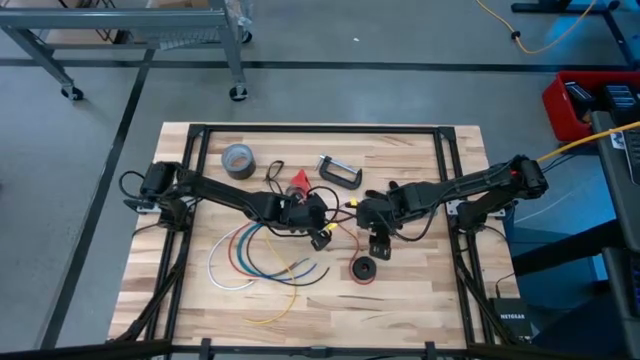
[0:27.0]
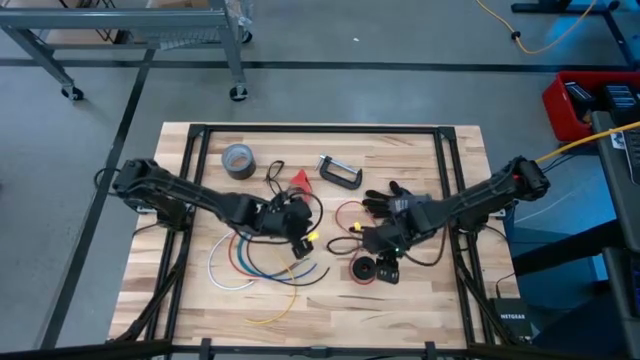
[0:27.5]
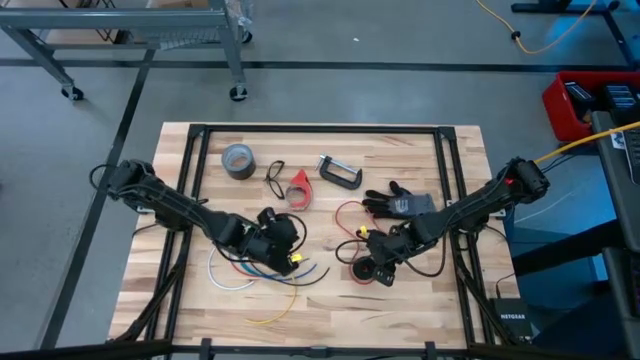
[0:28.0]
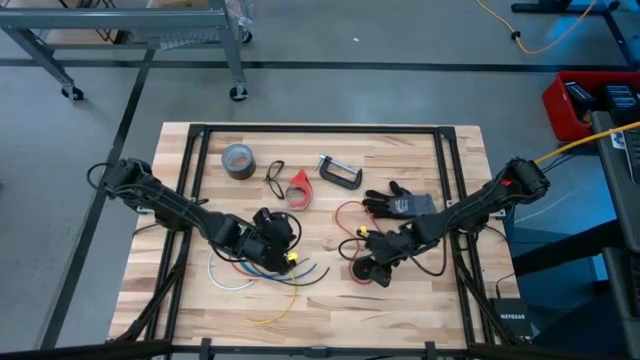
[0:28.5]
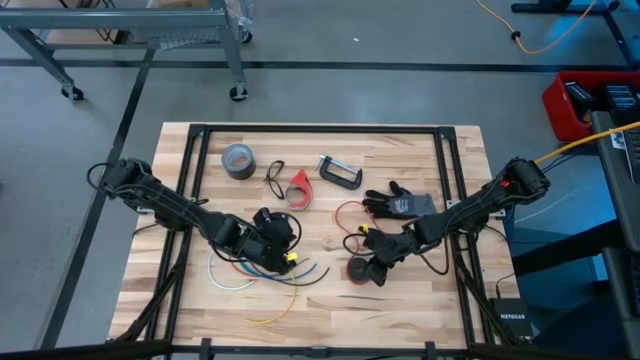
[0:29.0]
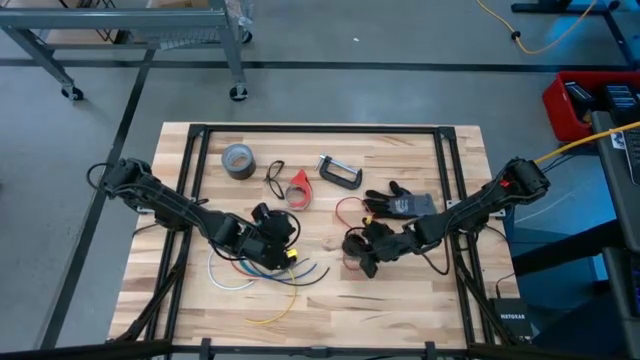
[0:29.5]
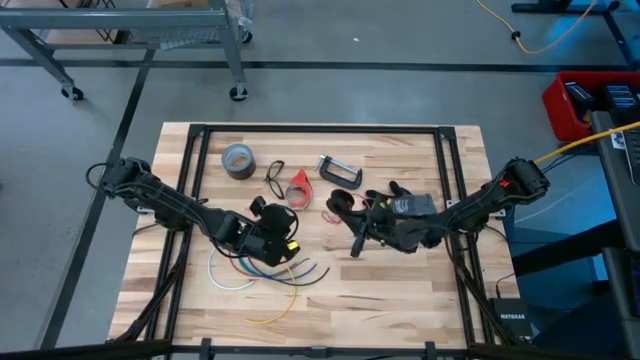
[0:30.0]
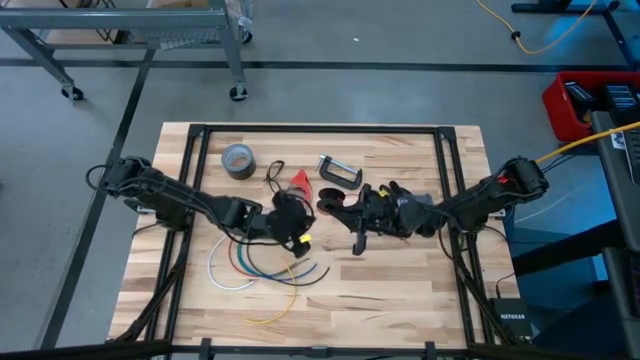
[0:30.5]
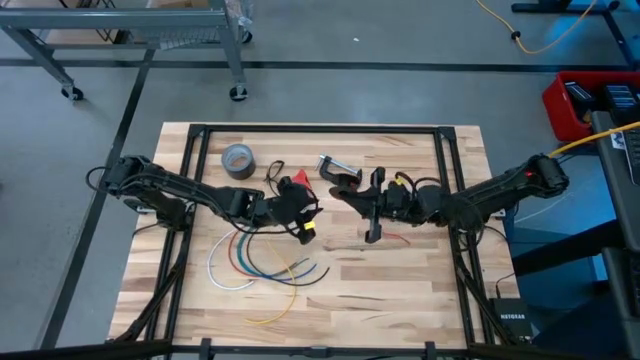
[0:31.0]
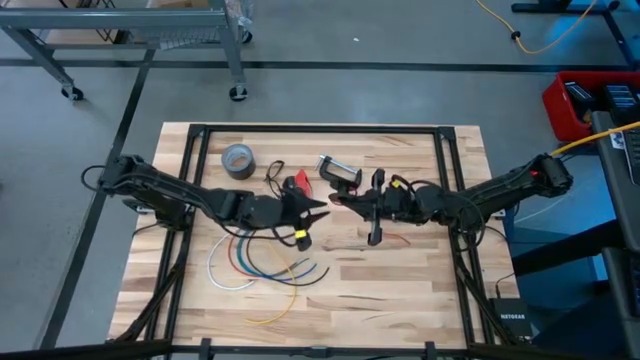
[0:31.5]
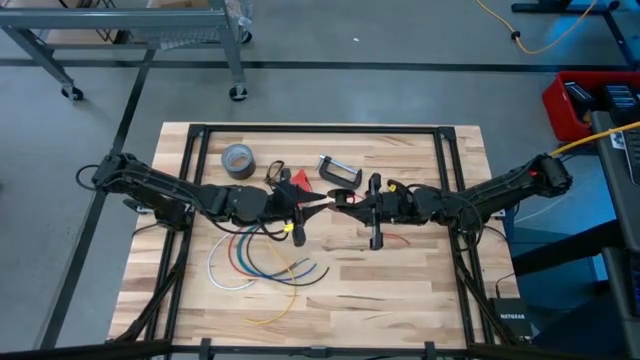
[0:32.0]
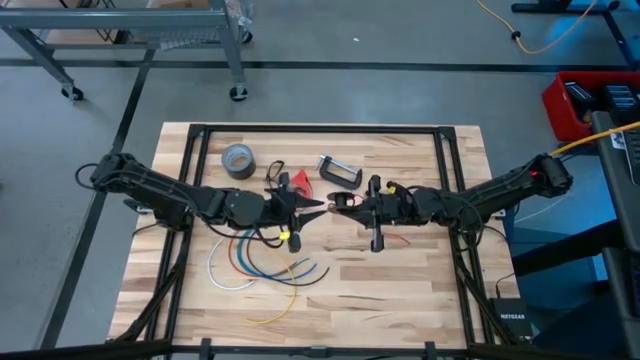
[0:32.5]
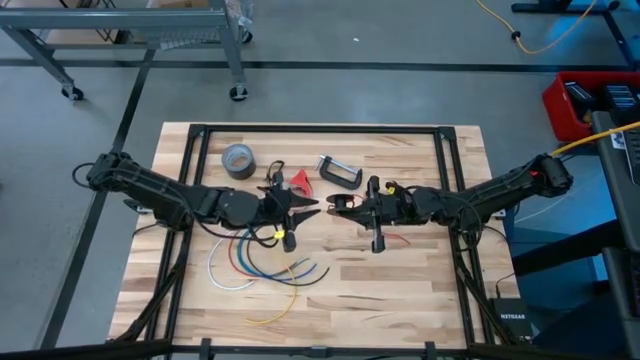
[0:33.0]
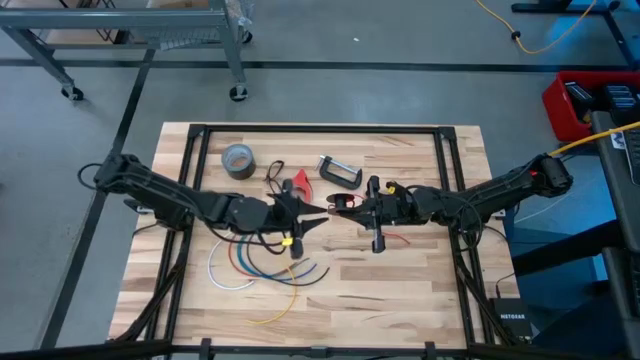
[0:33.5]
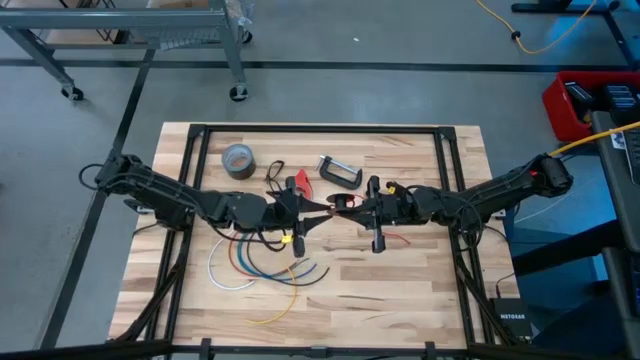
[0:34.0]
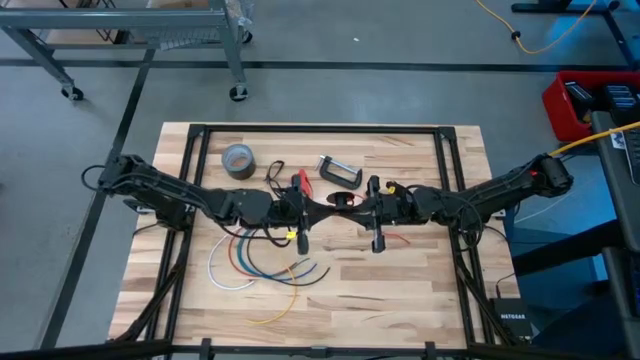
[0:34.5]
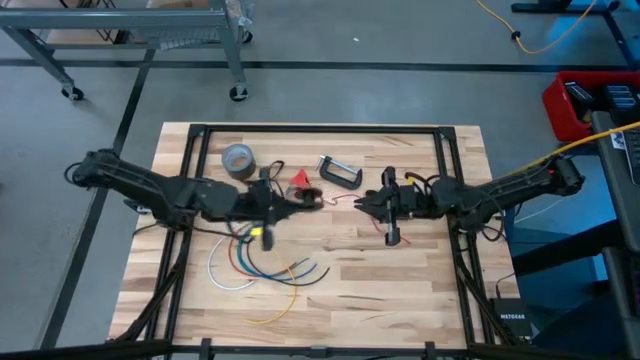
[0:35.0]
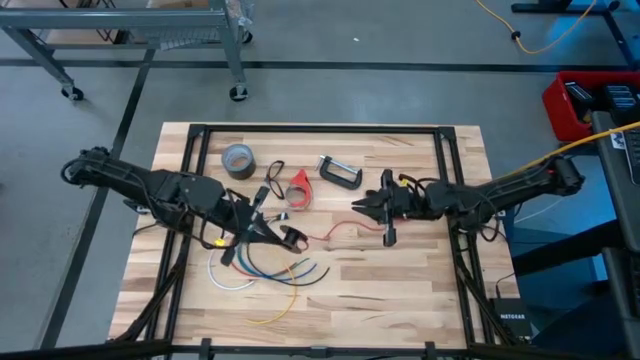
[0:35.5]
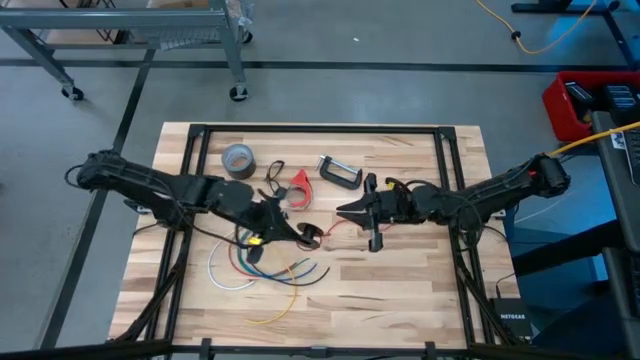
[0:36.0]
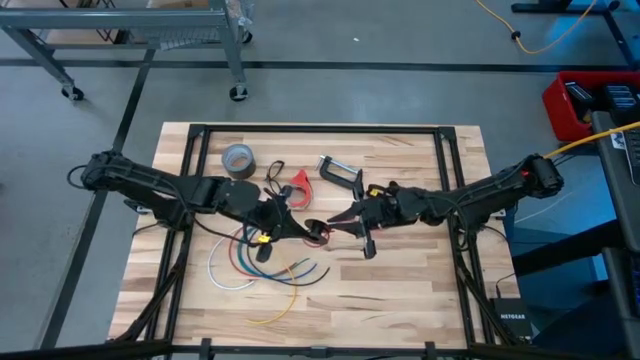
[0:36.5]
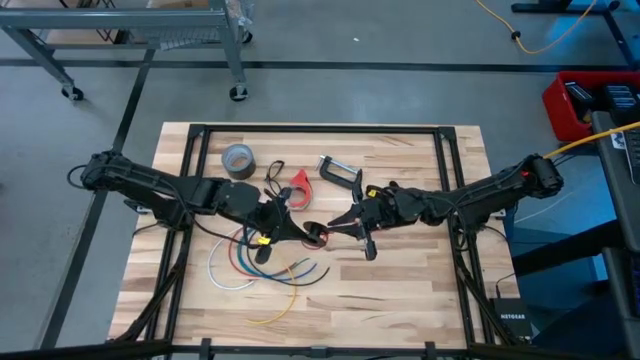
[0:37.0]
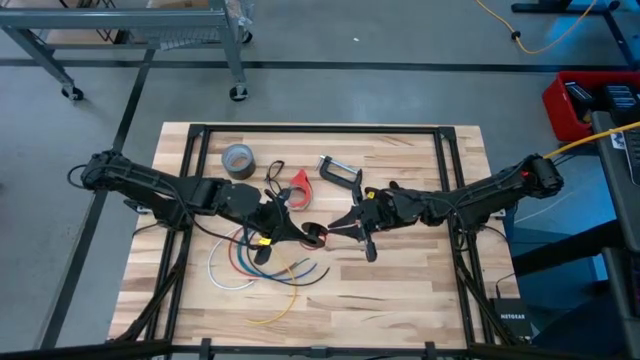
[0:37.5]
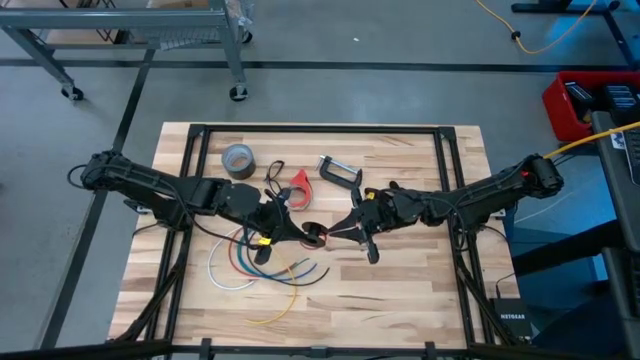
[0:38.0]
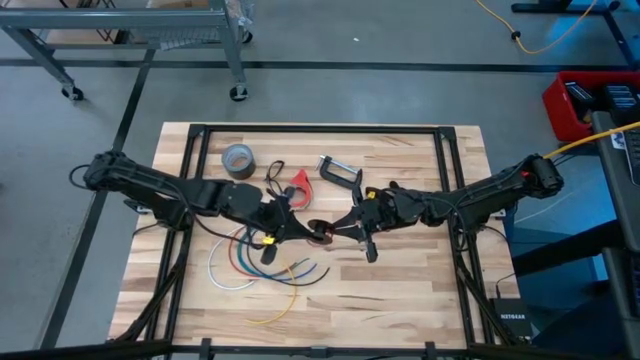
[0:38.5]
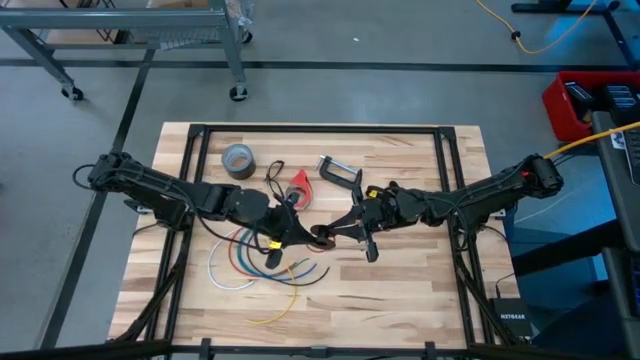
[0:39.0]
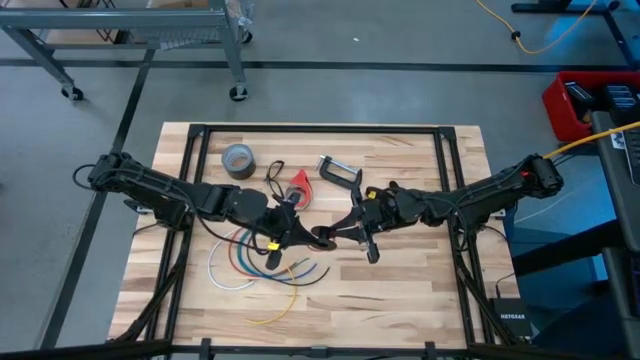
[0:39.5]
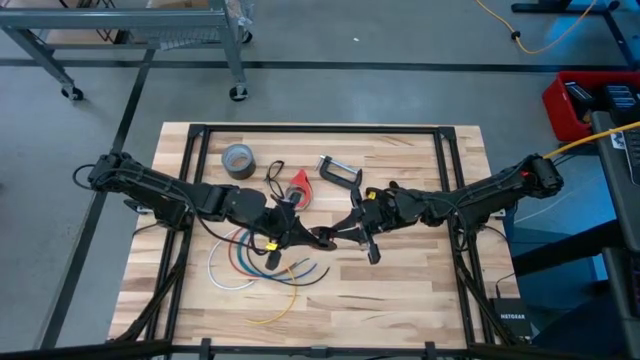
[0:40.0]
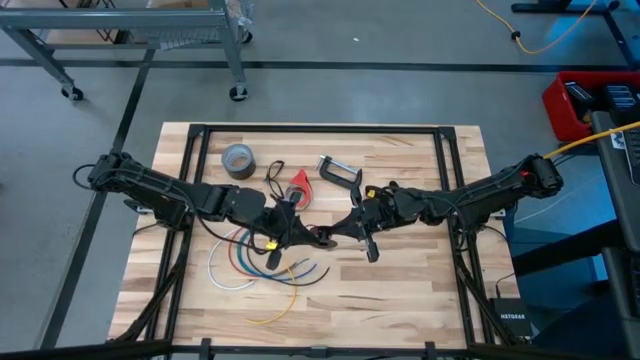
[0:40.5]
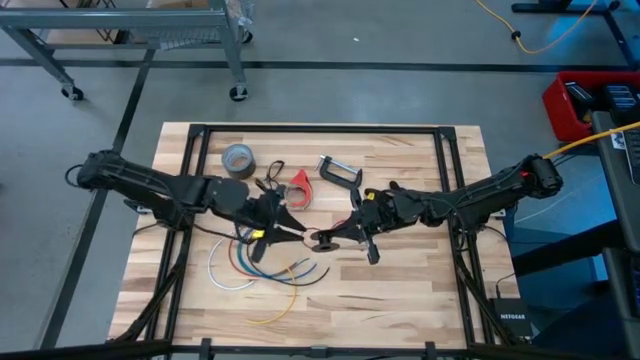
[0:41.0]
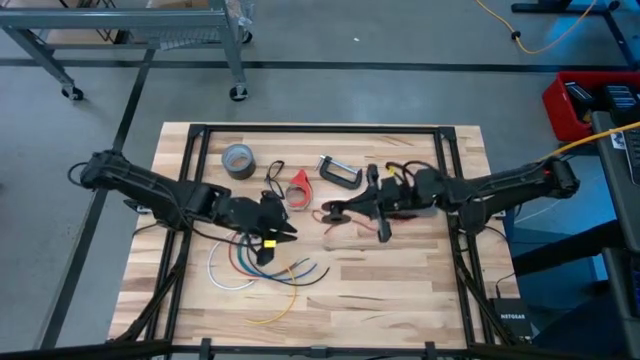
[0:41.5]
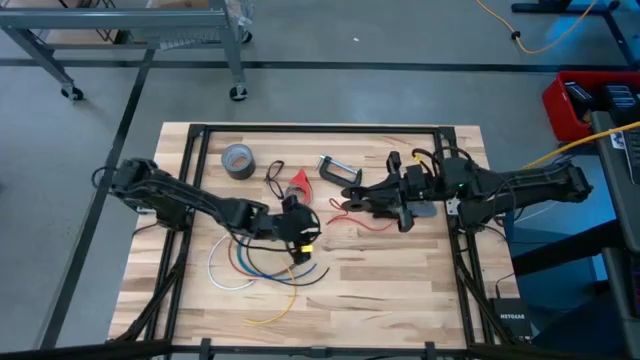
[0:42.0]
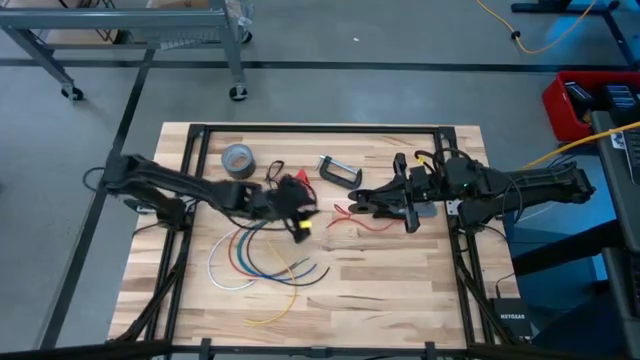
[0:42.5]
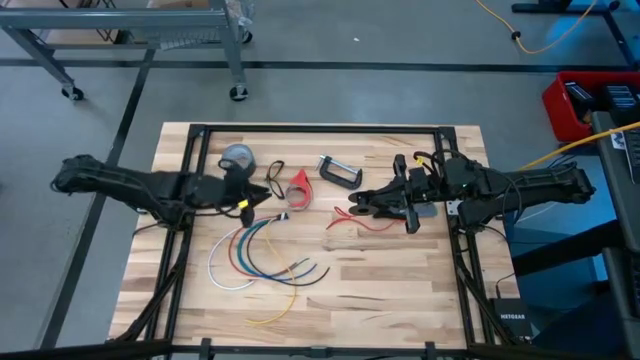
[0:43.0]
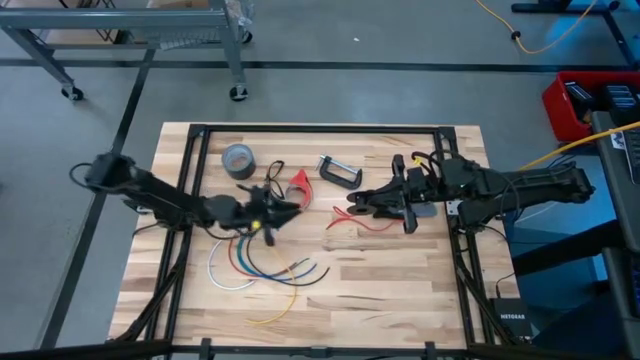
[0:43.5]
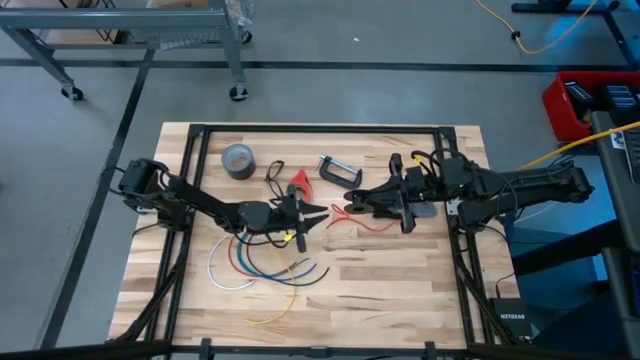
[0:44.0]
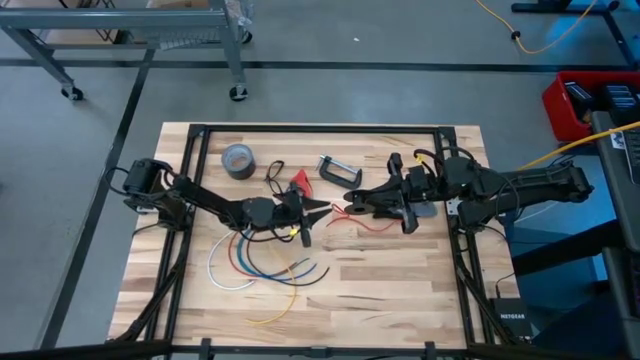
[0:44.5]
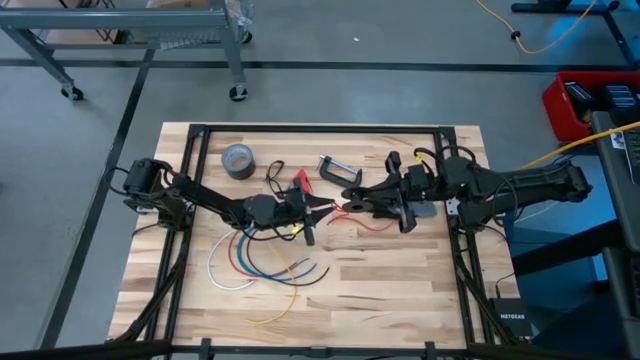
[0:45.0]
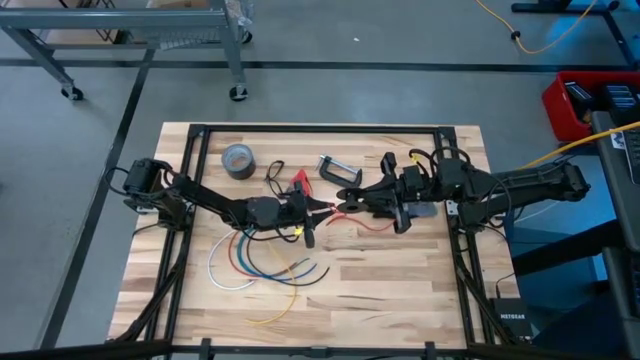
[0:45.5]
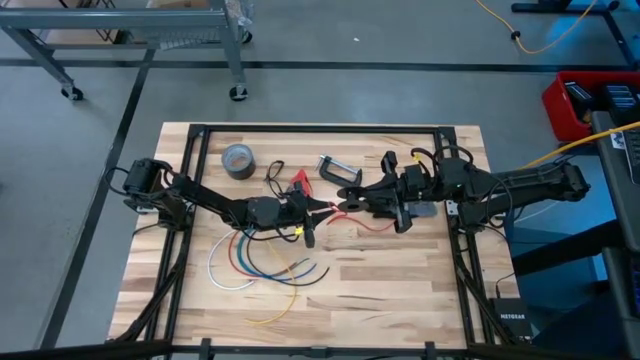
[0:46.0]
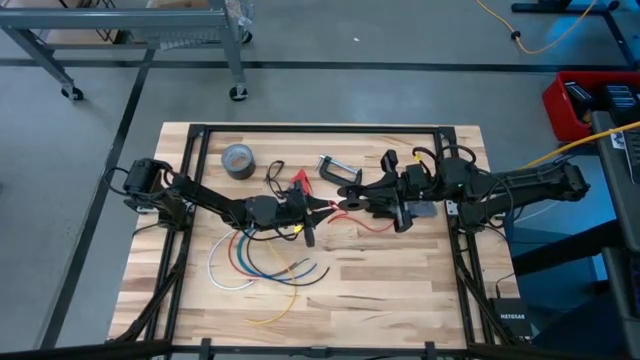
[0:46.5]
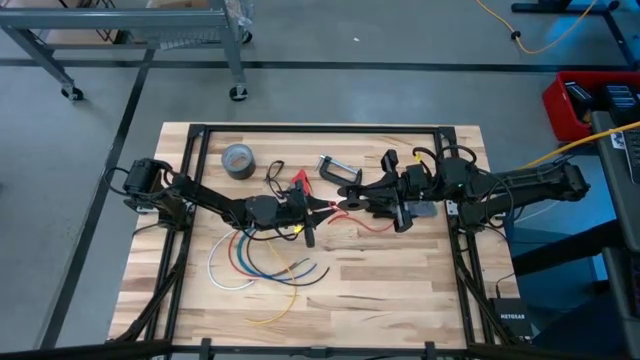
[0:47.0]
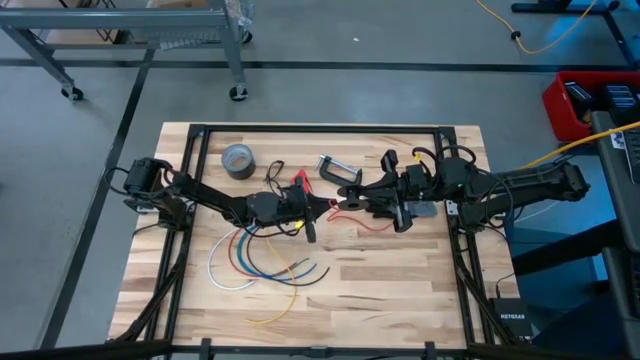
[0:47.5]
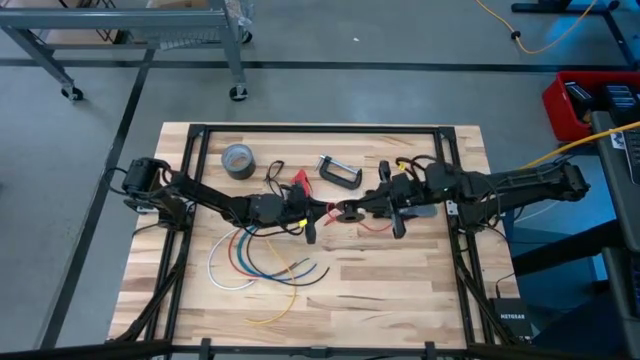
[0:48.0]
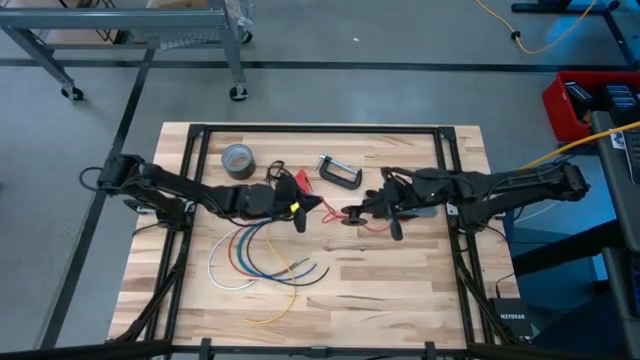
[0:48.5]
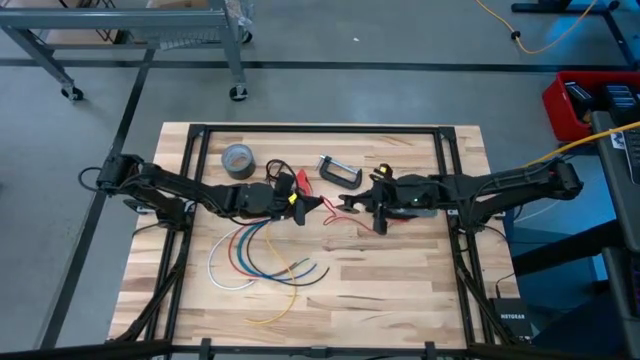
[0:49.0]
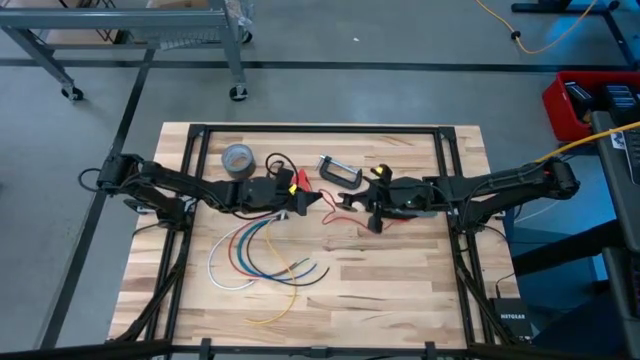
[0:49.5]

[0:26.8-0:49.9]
Task: Coil cords
Coil the orange wire on the spool
